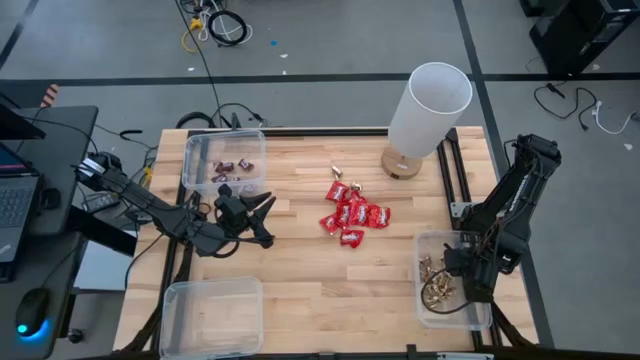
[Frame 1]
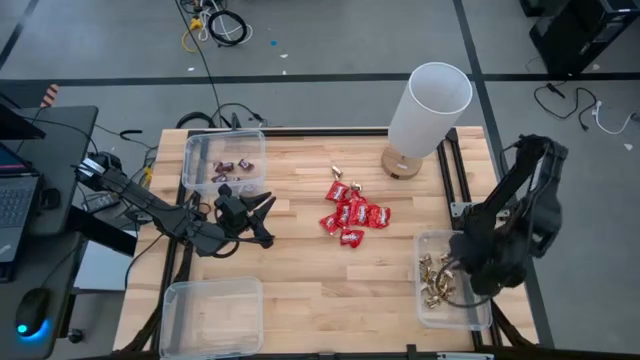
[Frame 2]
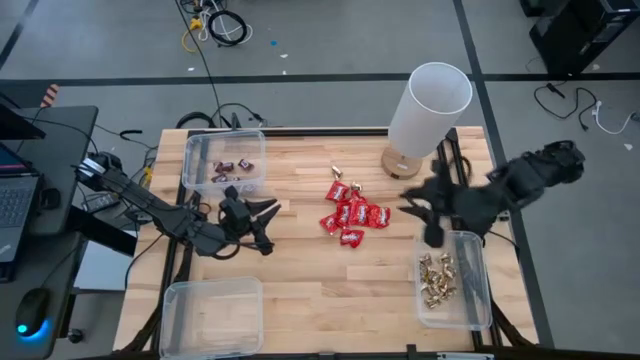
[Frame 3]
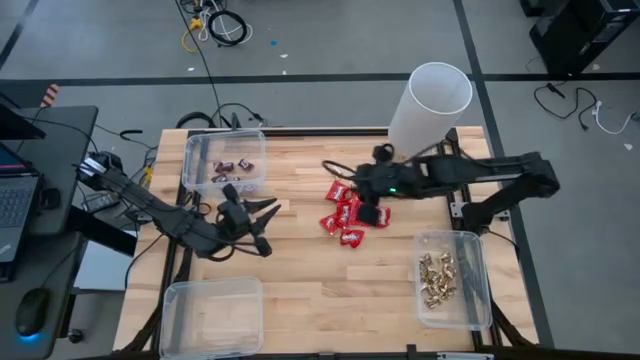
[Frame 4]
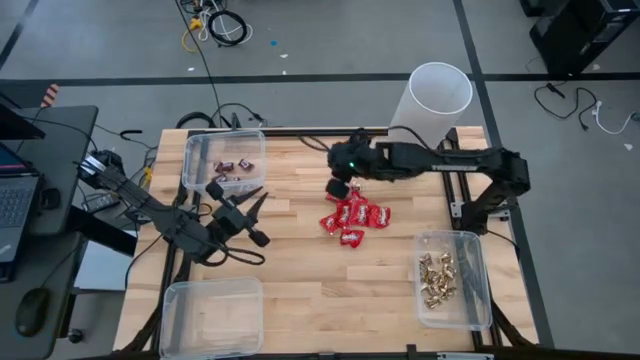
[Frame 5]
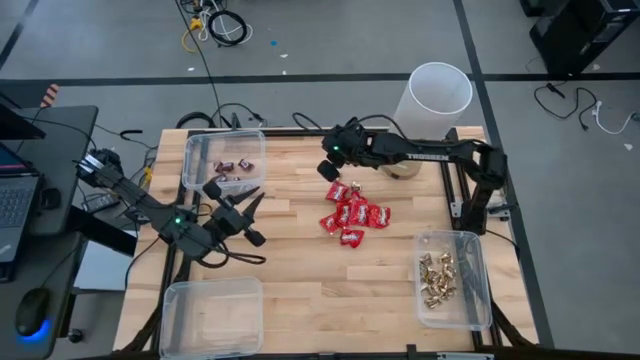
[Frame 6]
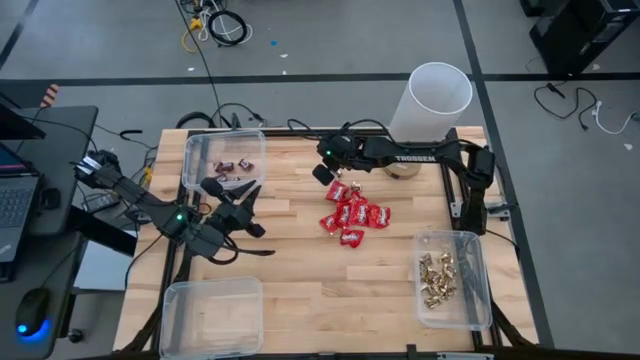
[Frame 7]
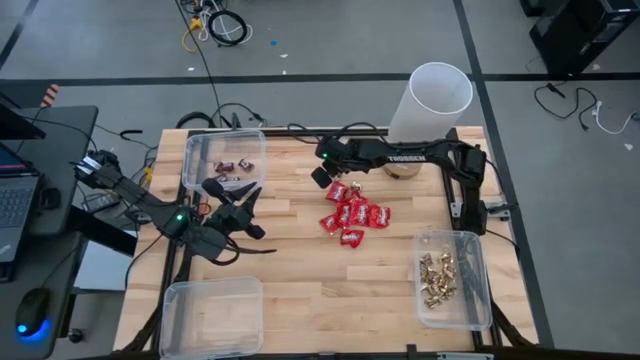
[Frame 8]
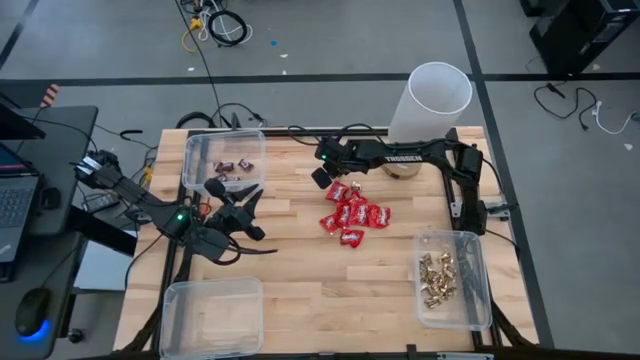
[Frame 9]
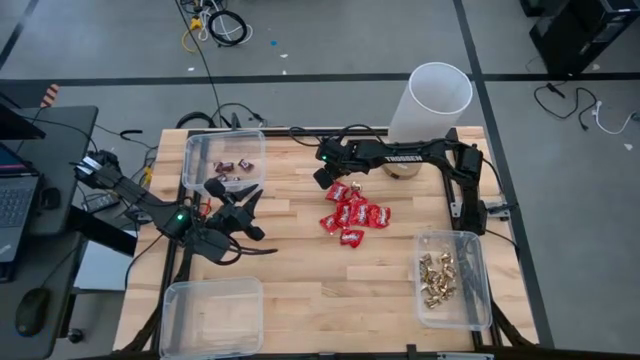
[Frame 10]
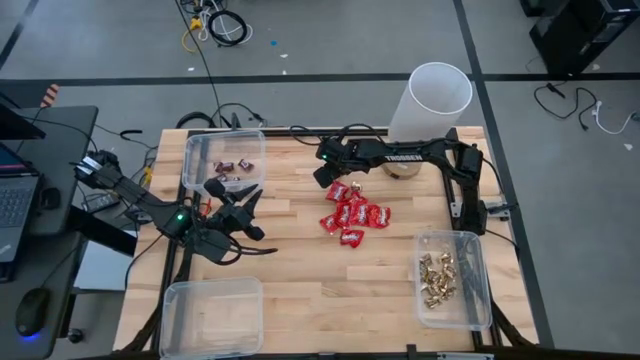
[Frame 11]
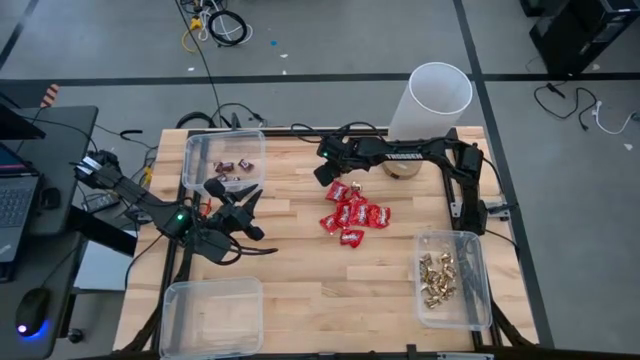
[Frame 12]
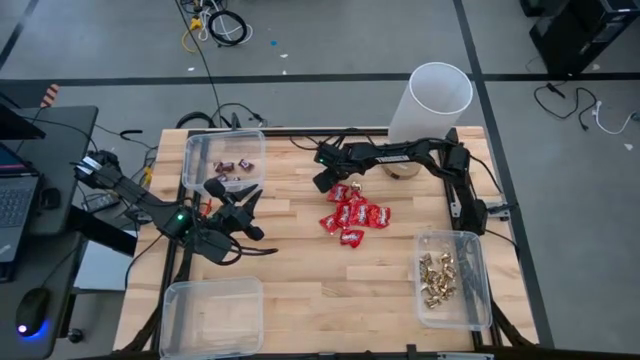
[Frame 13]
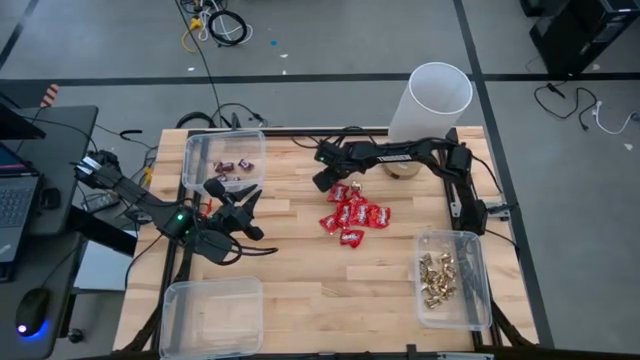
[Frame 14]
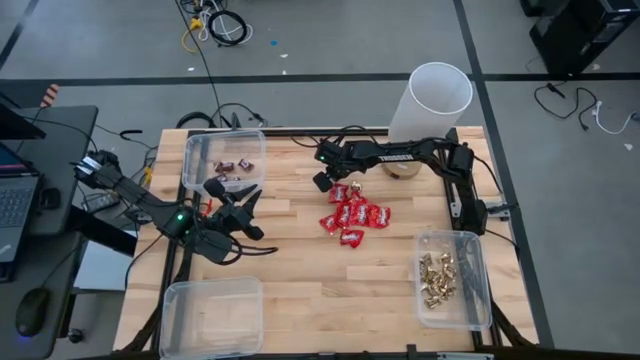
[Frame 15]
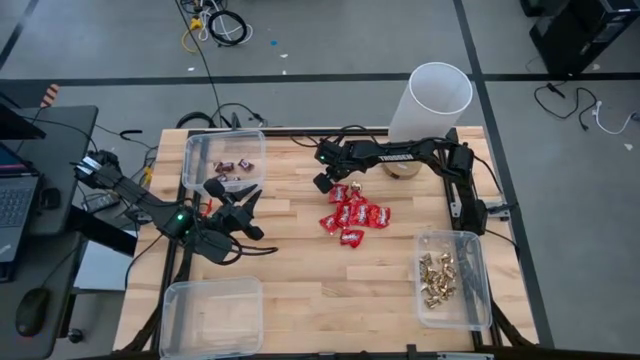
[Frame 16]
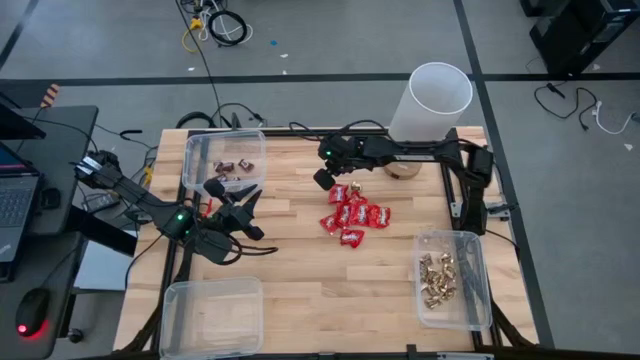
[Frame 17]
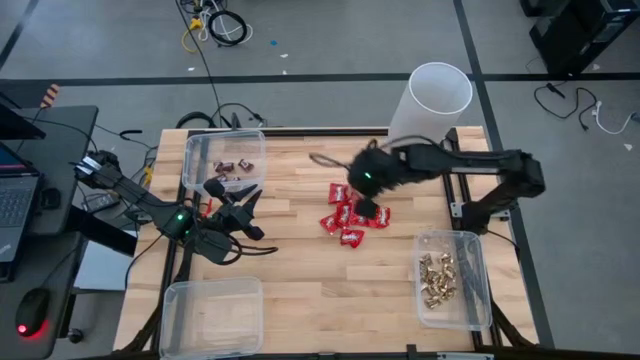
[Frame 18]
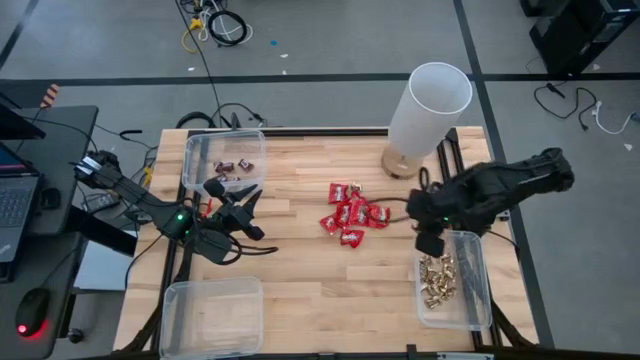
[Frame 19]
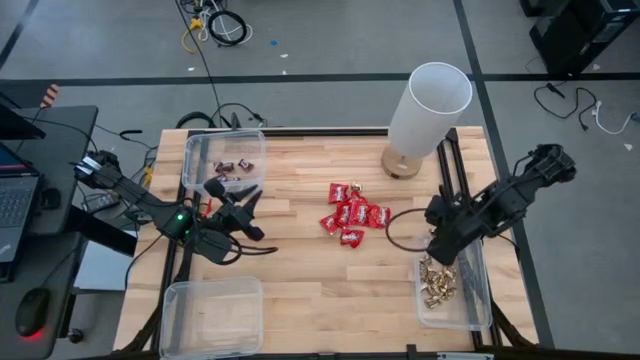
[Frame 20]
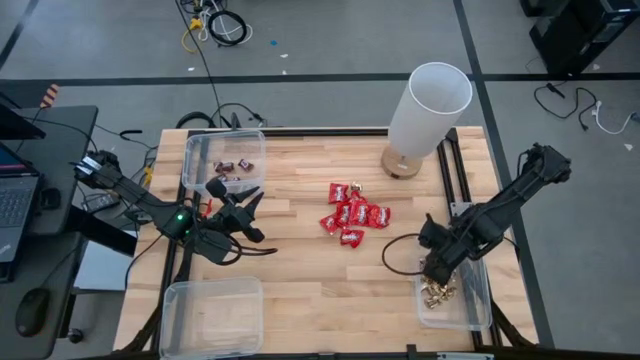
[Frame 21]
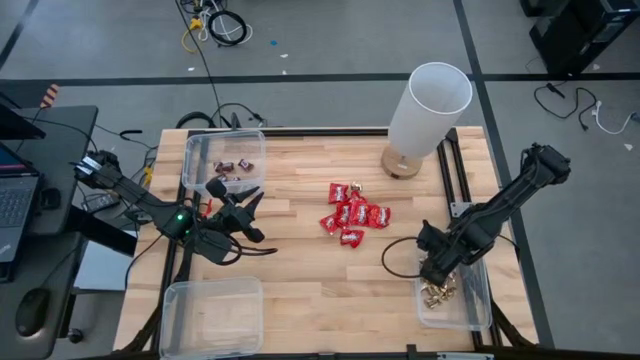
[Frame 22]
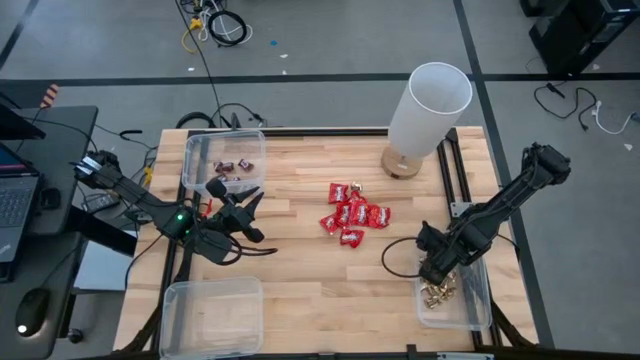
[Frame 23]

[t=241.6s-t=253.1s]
Task: Sort candy
Put the gold chocolate into the bottom right transparent bin
